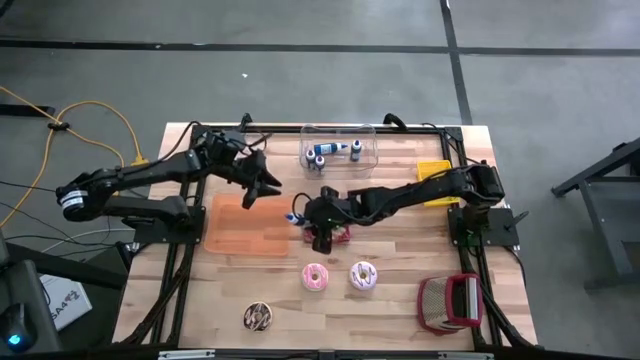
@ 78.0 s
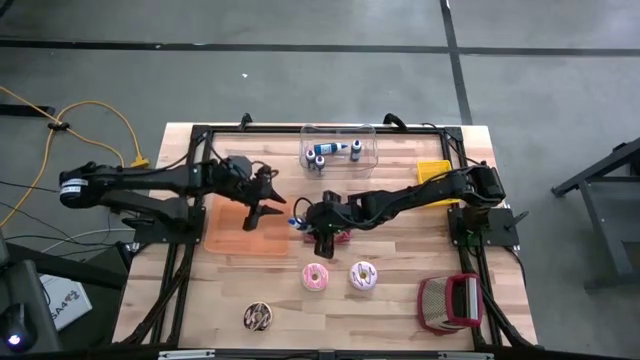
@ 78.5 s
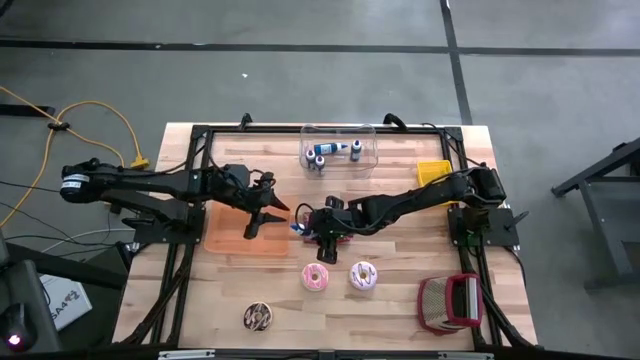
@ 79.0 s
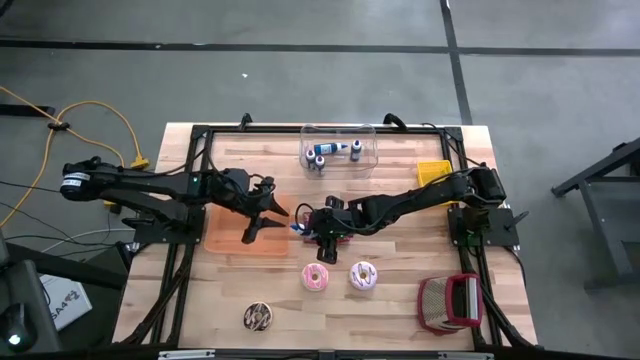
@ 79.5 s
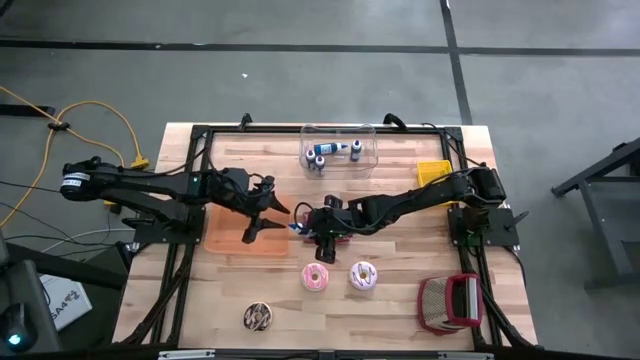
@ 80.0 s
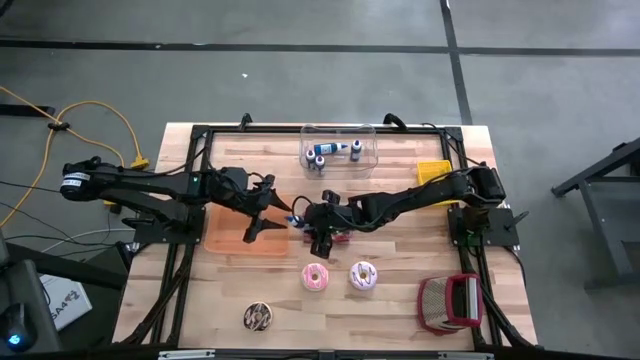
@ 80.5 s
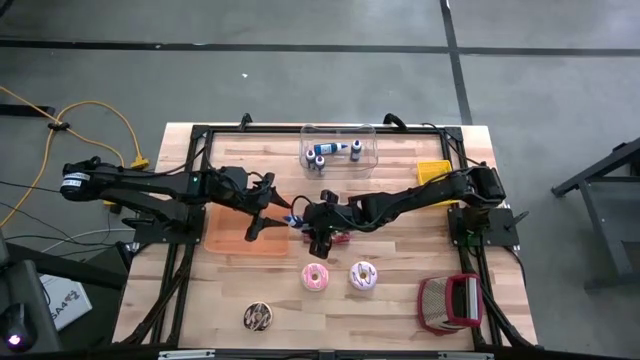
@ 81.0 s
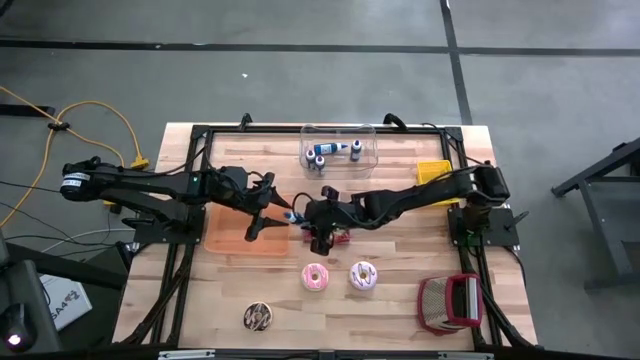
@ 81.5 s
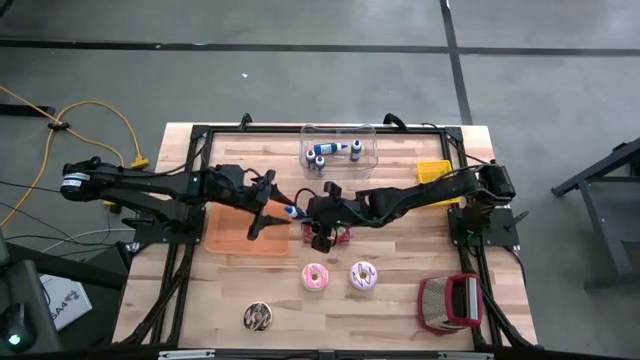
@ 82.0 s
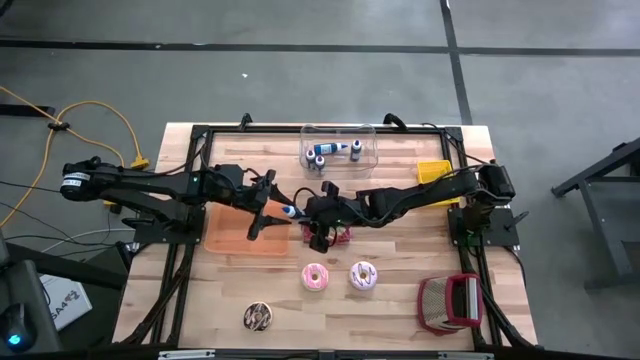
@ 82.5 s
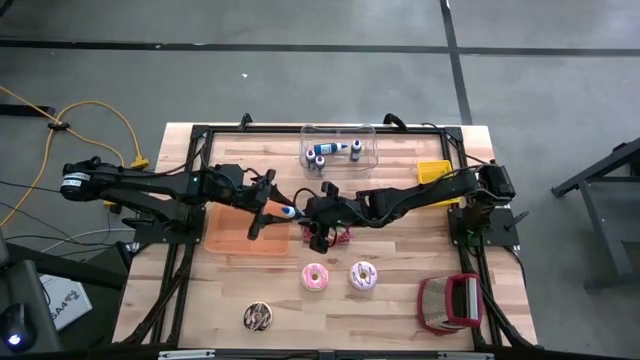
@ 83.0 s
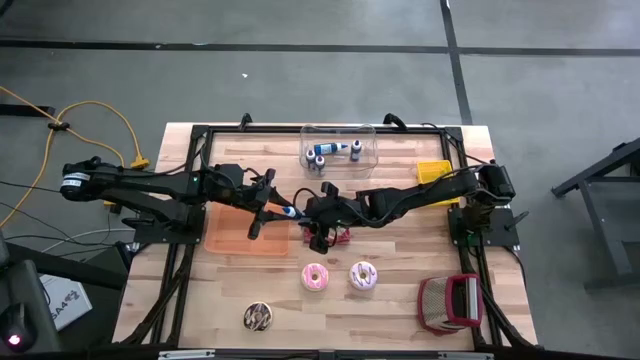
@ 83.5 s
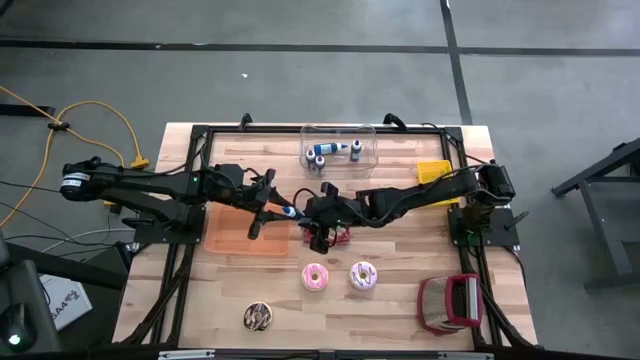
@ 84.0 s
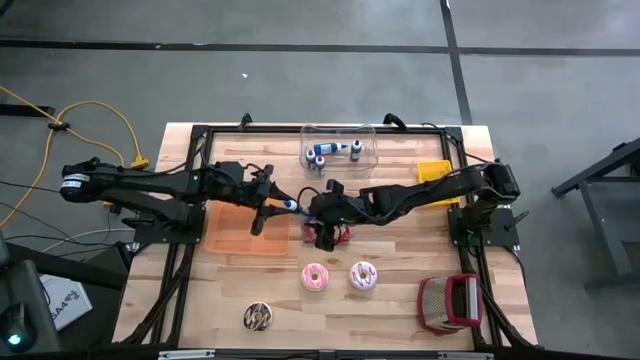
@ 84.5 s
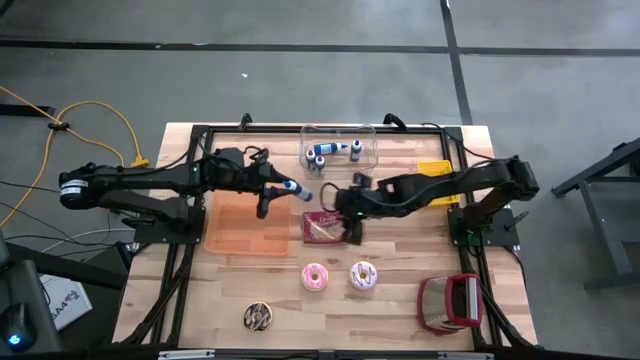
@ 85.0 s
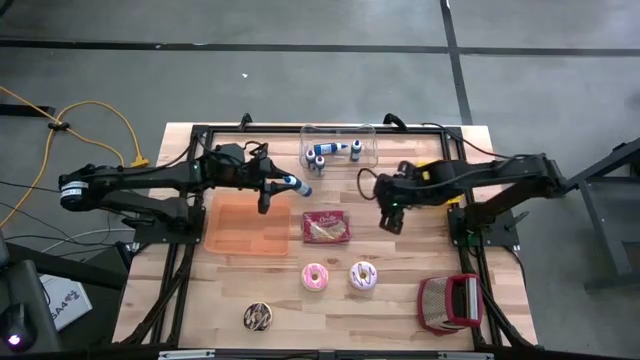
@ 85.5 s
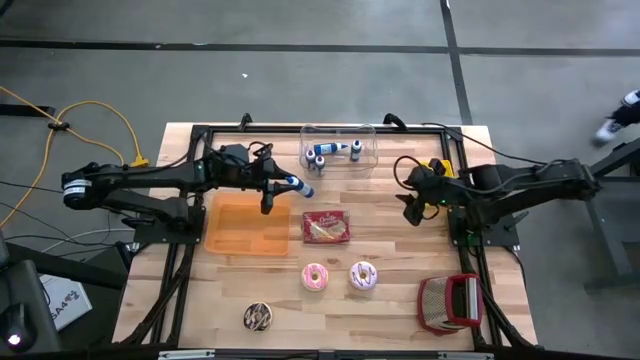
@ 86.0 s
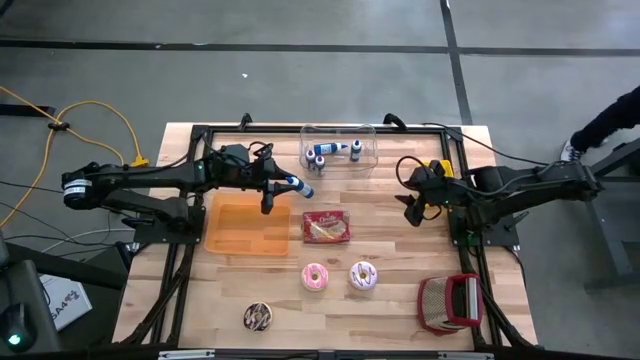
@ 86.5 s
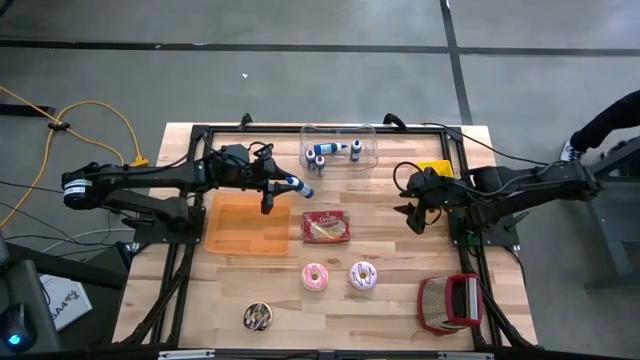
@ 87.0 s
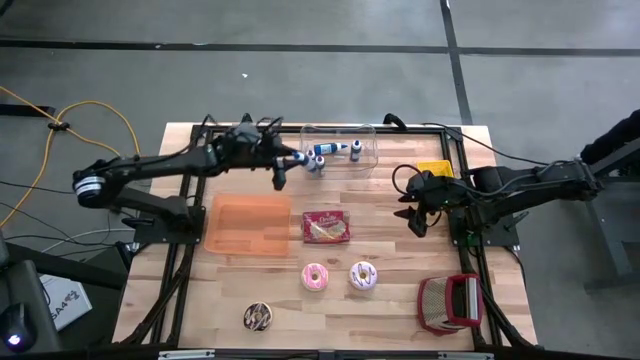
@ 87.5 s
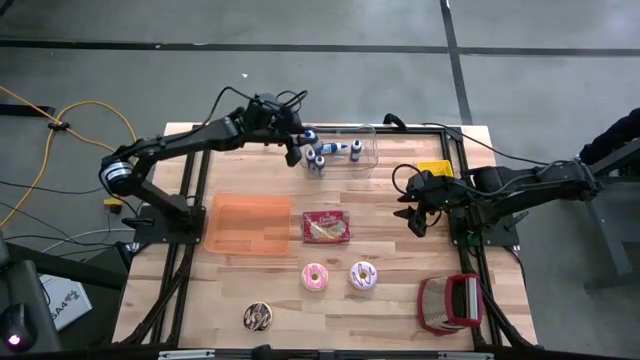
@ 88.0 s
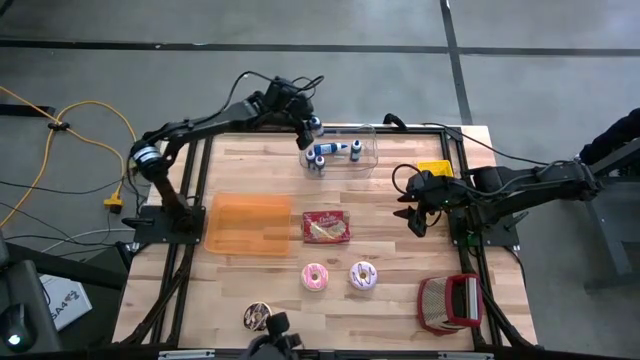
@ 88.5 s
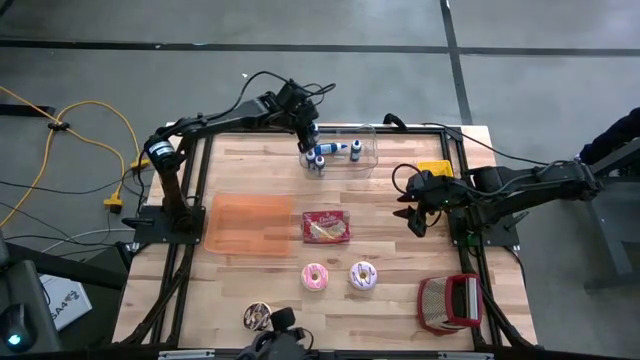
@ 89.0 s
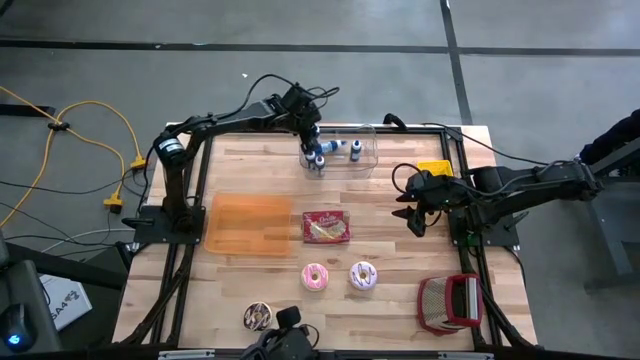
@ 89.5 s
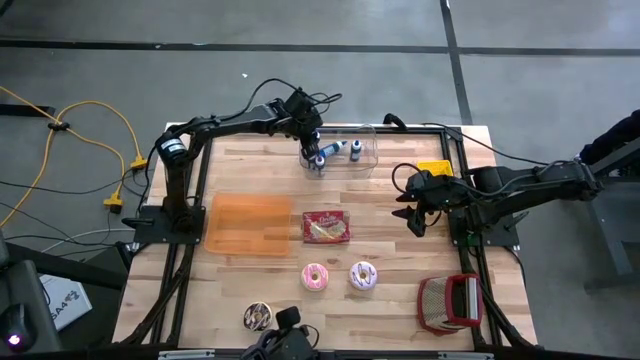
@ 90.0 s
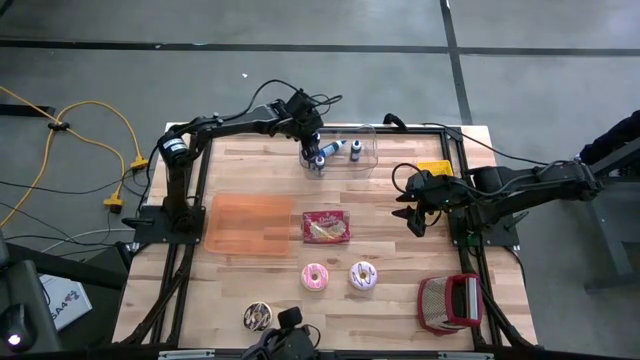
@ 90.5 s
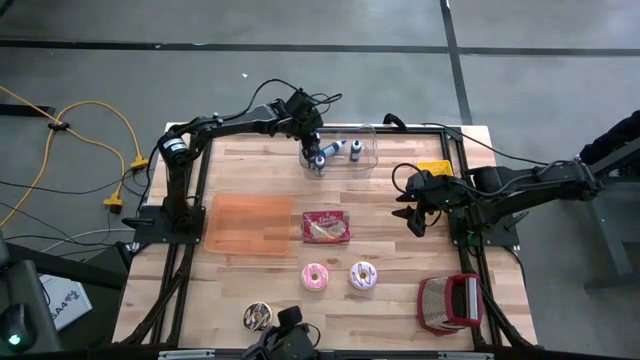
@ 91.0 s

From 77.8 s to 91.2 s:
Put the top blue coloring bottle into the transparent bin

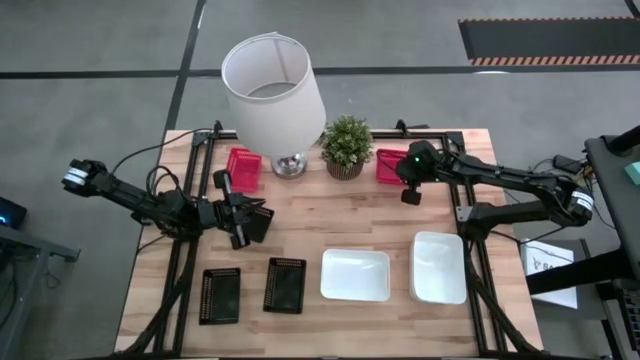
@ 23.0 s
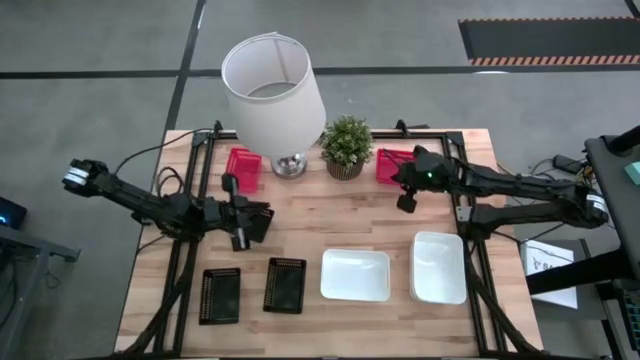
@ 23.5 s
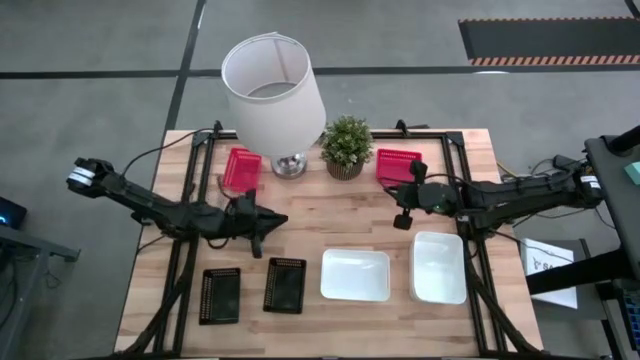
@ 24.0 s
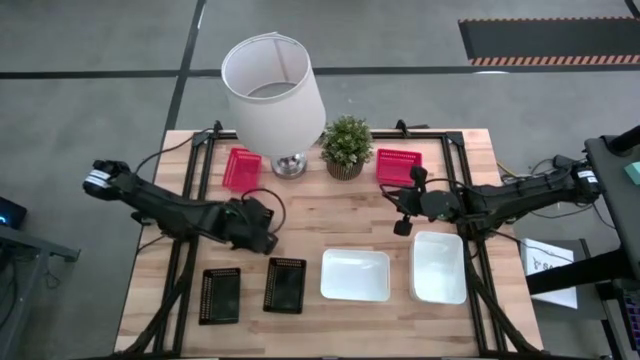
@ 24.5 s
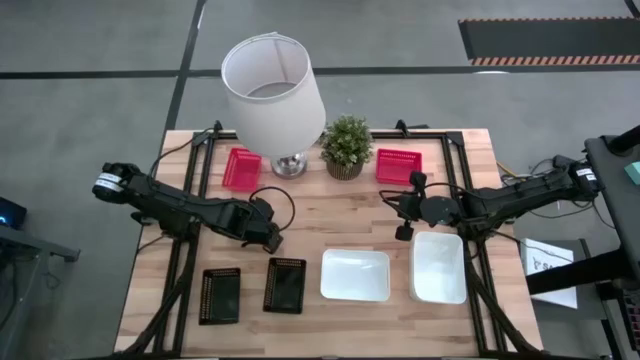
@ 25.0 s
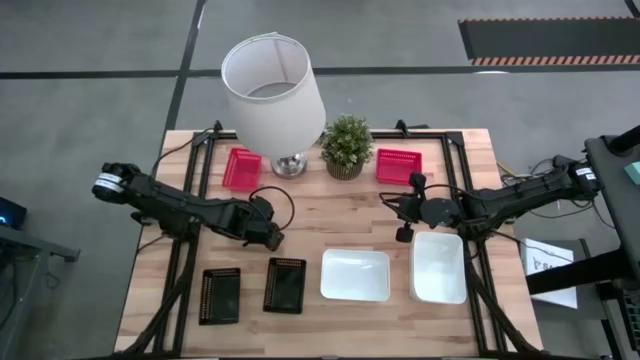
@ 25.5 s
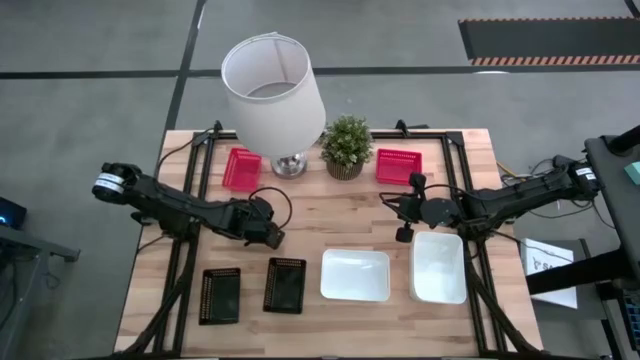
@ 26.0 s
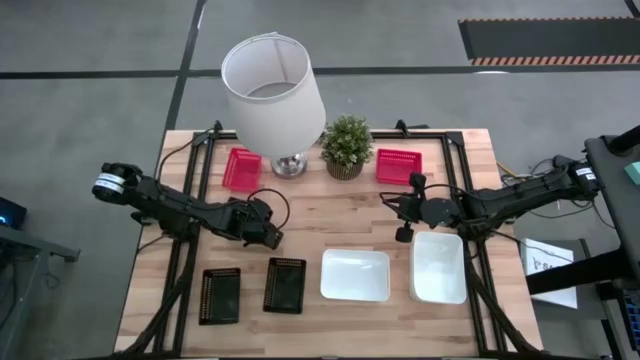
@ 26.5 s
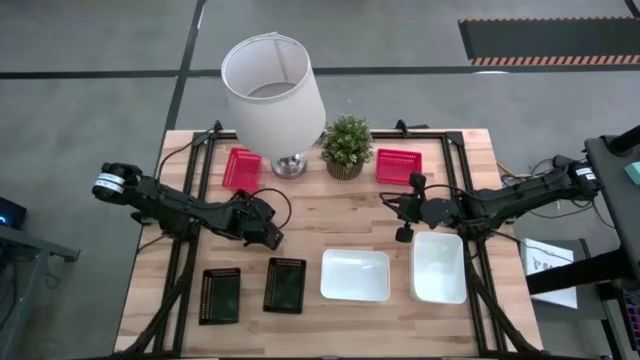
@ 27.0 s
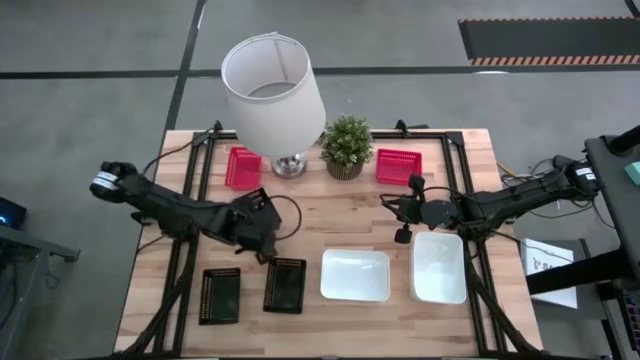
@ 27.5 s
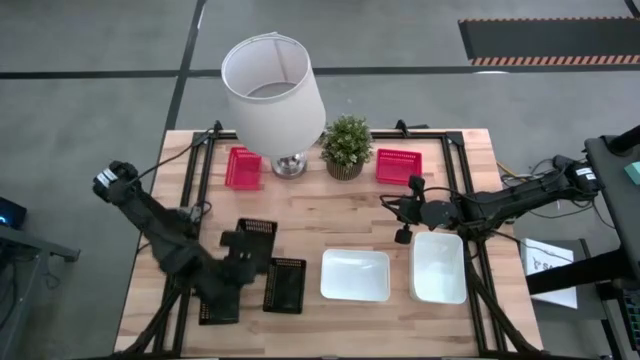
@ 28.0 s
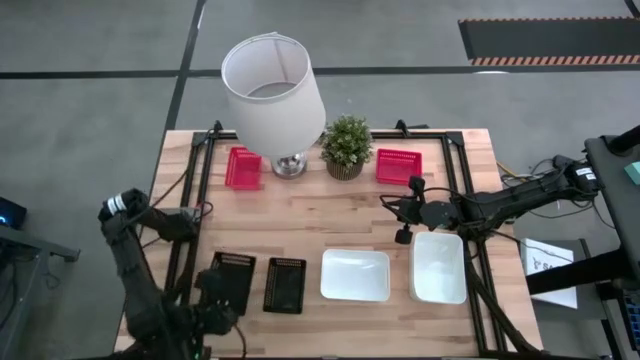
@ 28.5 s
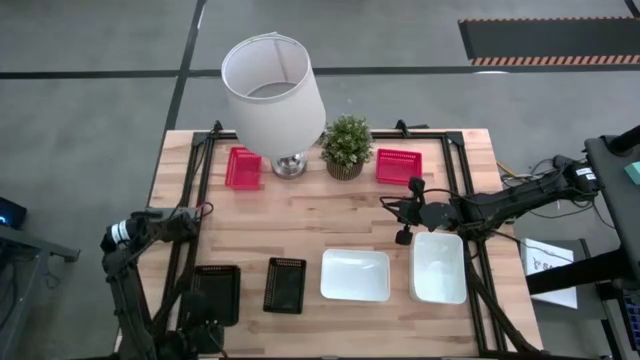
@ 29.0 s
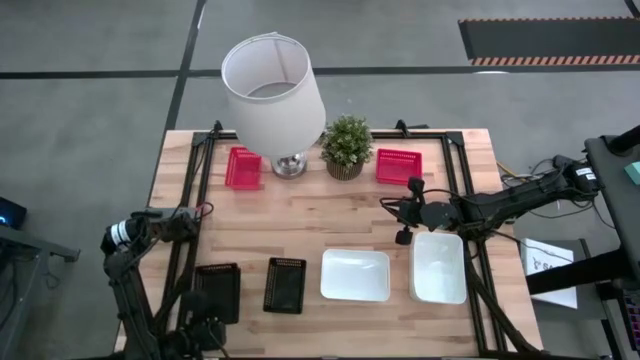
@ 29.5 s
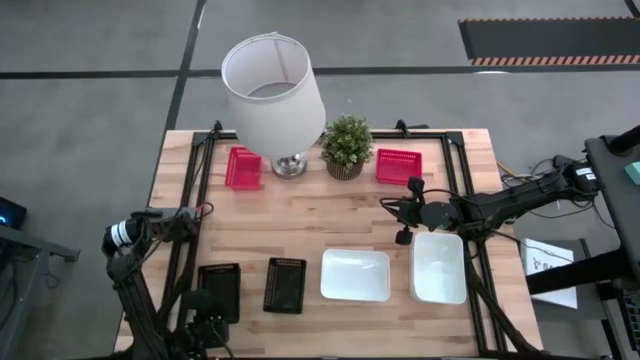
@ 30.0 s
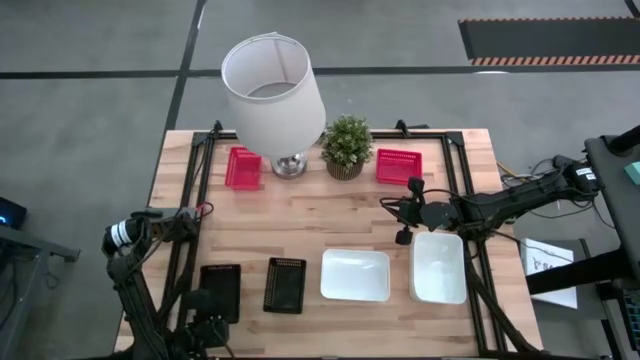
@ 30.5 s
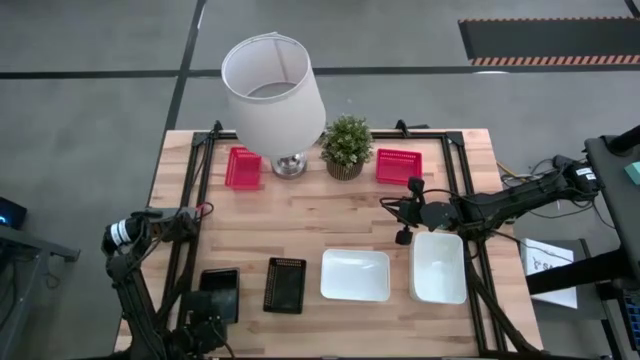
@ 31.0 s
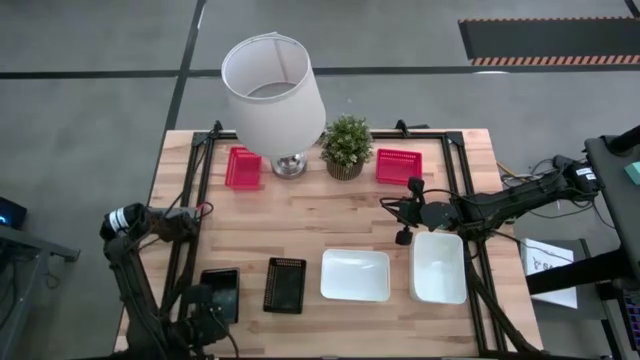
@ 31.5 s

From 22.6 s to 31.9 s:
Stack the top black bin on the bottom left black bin
